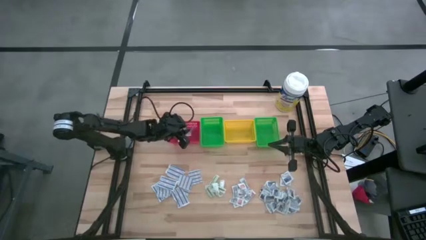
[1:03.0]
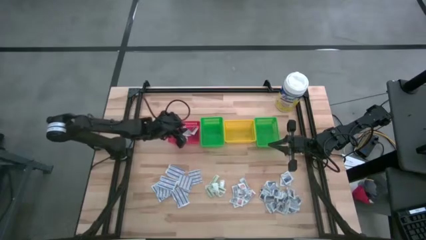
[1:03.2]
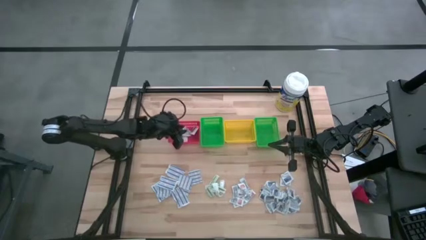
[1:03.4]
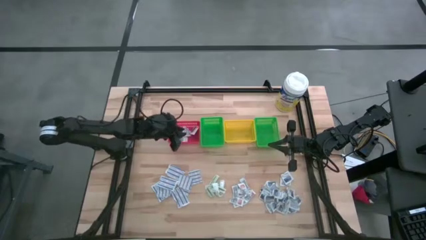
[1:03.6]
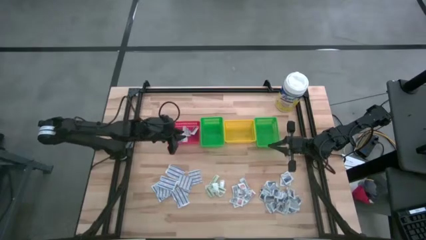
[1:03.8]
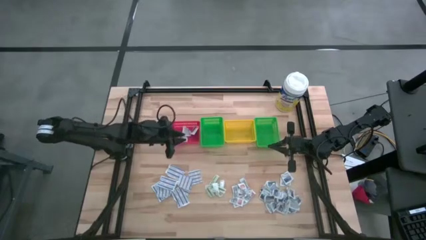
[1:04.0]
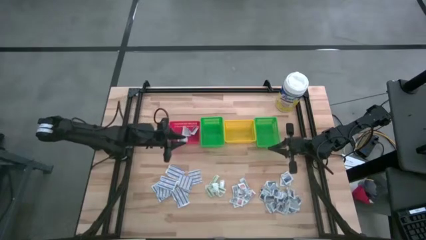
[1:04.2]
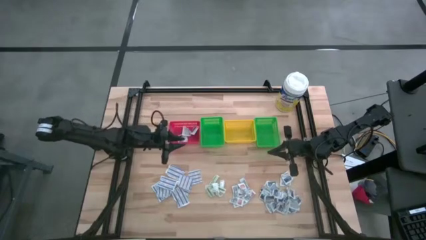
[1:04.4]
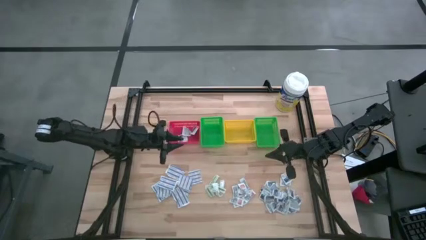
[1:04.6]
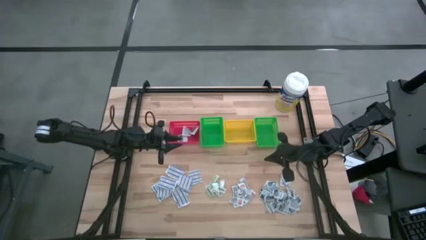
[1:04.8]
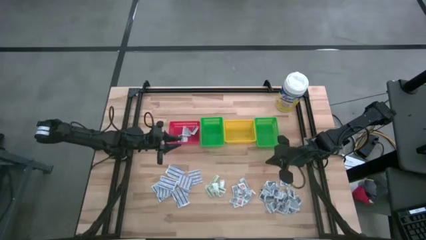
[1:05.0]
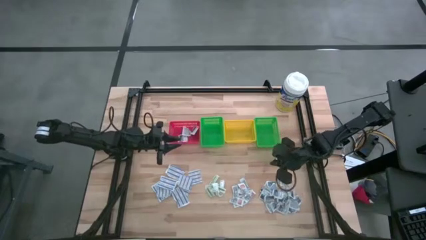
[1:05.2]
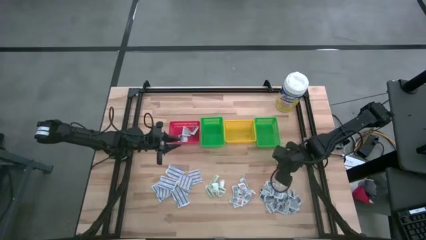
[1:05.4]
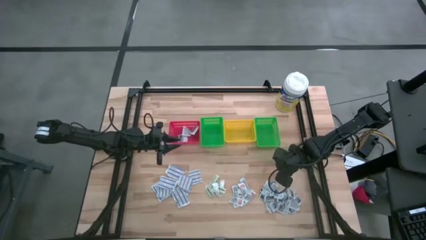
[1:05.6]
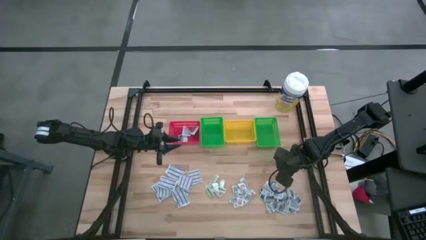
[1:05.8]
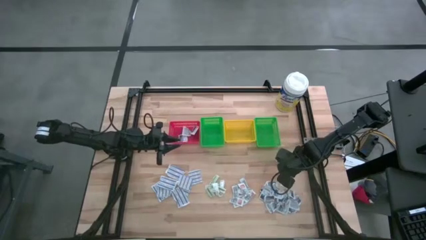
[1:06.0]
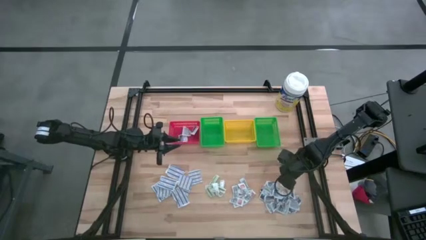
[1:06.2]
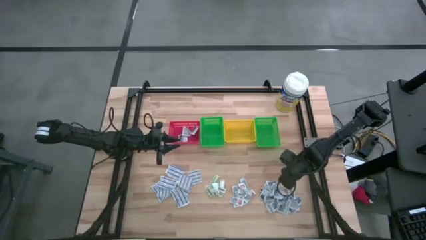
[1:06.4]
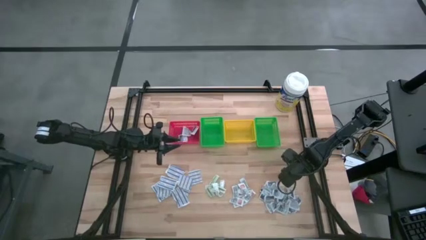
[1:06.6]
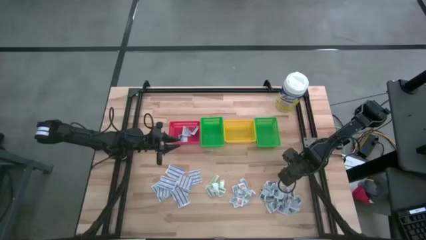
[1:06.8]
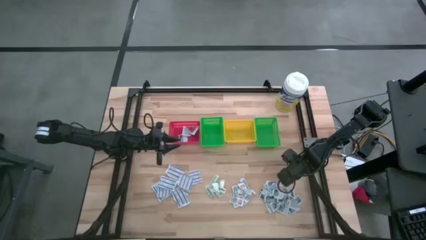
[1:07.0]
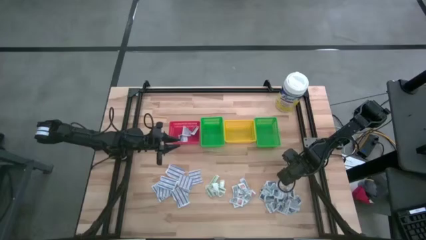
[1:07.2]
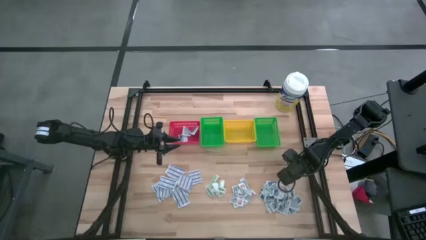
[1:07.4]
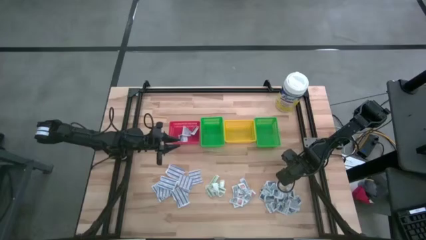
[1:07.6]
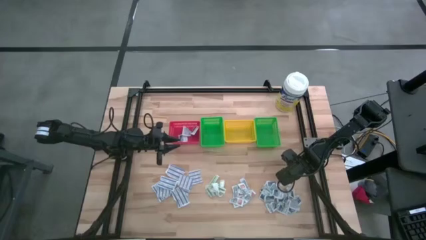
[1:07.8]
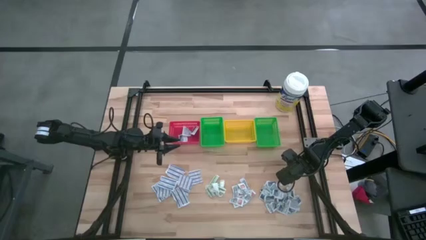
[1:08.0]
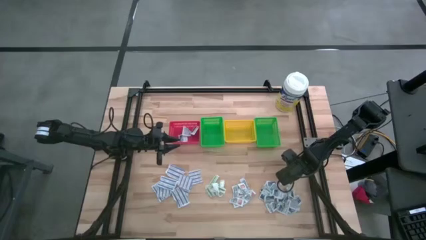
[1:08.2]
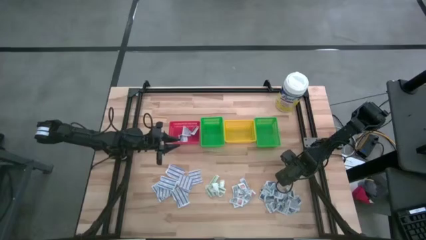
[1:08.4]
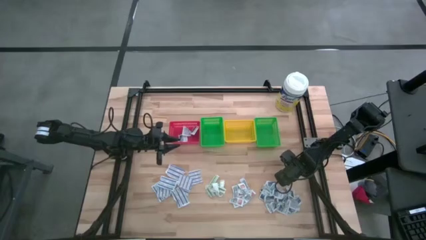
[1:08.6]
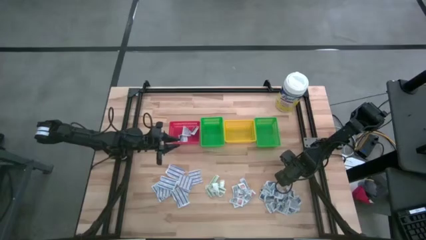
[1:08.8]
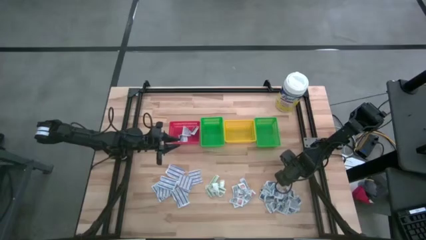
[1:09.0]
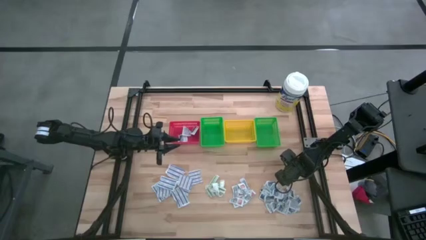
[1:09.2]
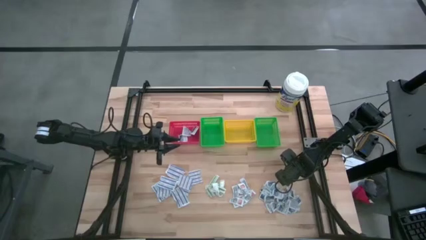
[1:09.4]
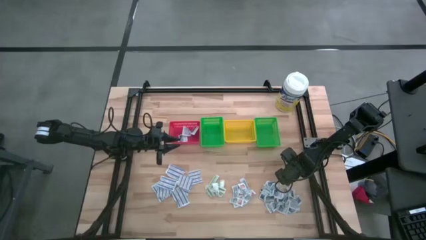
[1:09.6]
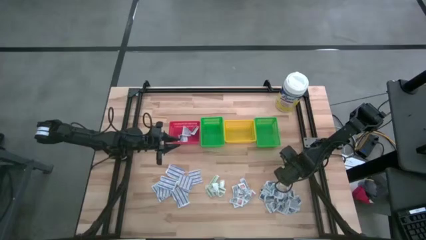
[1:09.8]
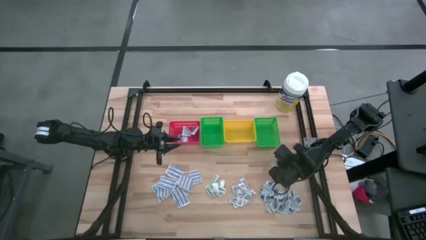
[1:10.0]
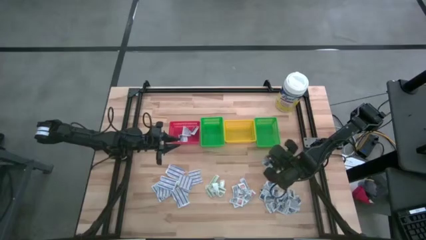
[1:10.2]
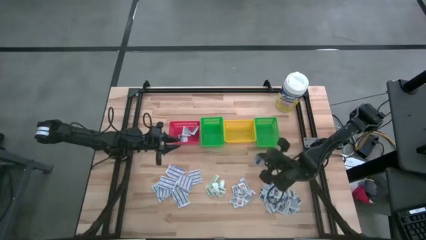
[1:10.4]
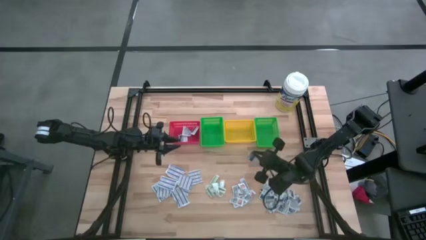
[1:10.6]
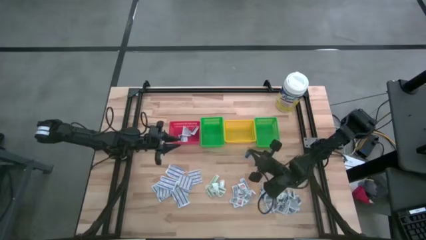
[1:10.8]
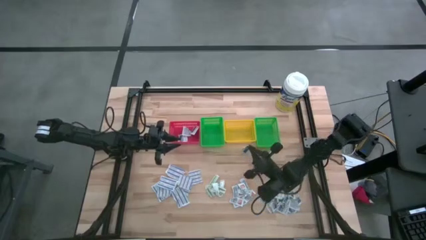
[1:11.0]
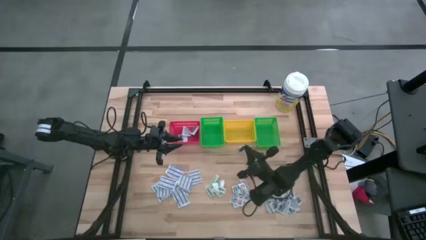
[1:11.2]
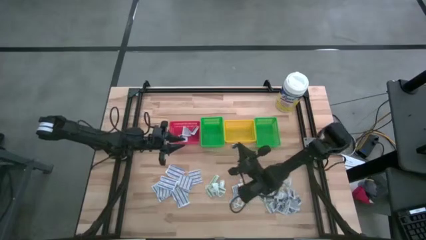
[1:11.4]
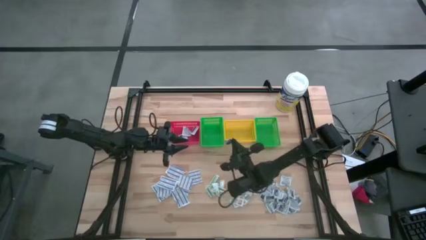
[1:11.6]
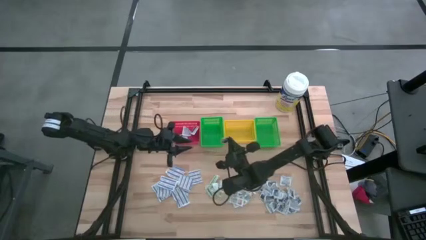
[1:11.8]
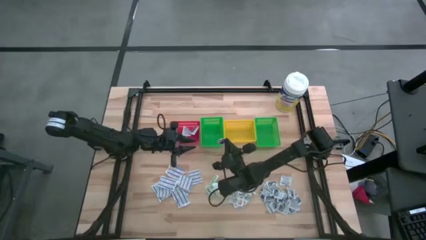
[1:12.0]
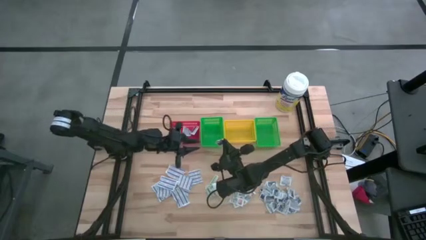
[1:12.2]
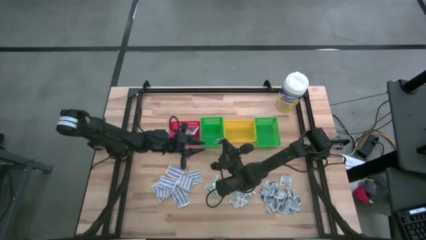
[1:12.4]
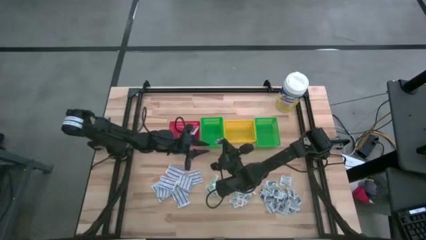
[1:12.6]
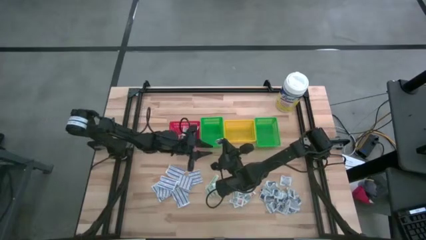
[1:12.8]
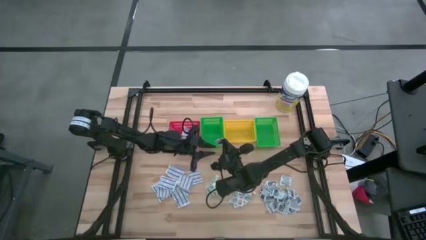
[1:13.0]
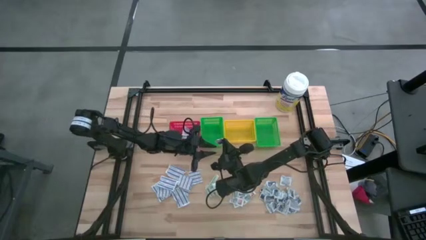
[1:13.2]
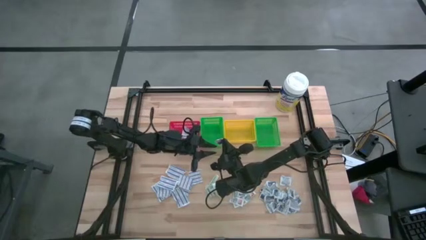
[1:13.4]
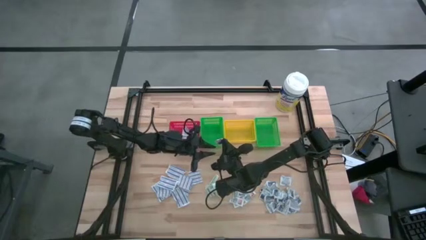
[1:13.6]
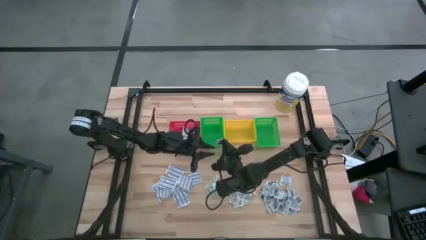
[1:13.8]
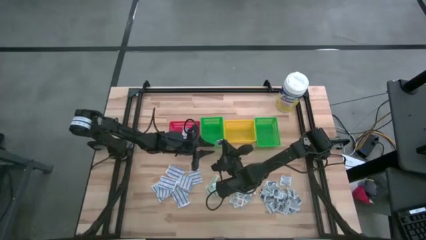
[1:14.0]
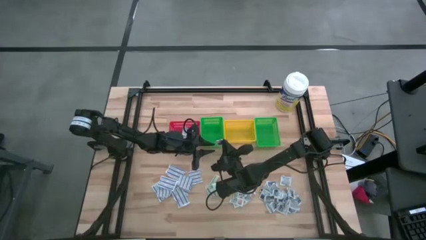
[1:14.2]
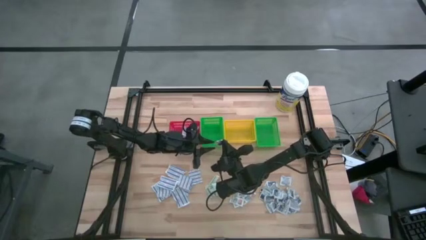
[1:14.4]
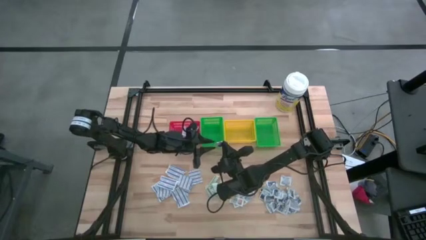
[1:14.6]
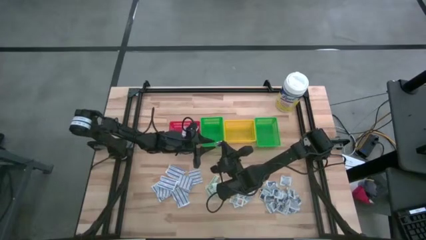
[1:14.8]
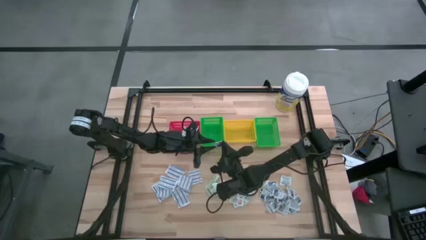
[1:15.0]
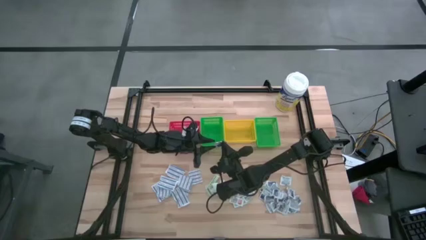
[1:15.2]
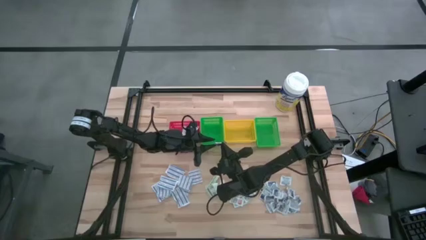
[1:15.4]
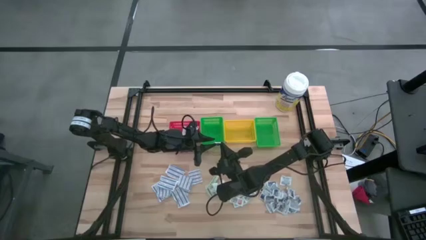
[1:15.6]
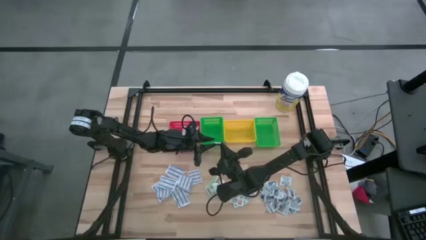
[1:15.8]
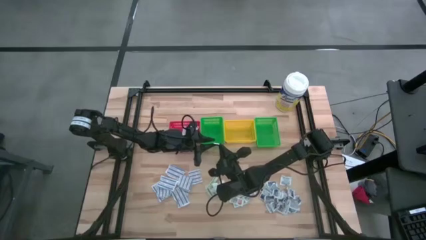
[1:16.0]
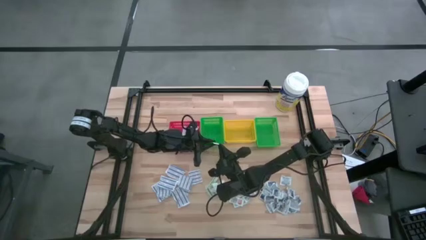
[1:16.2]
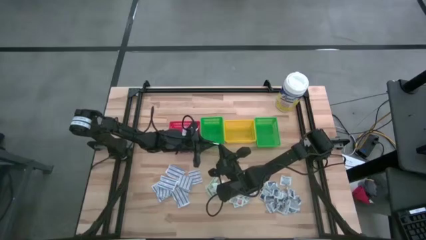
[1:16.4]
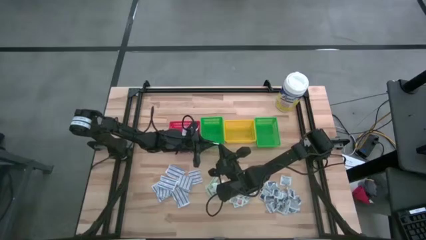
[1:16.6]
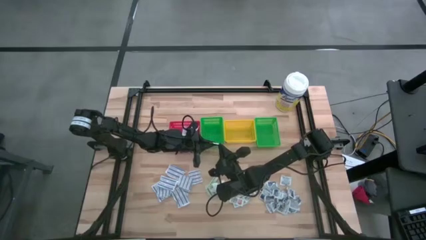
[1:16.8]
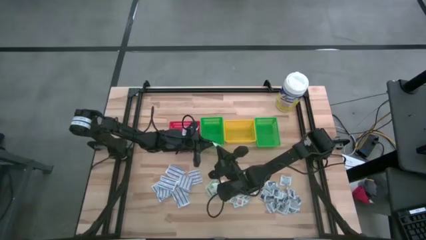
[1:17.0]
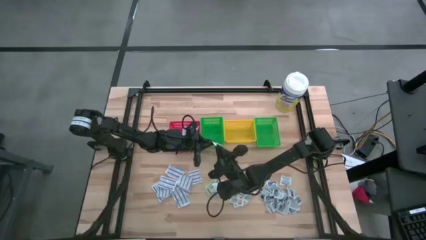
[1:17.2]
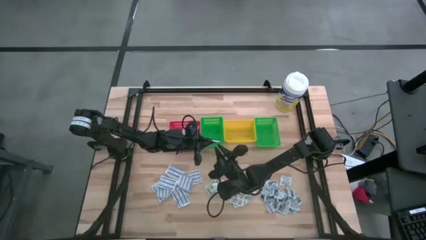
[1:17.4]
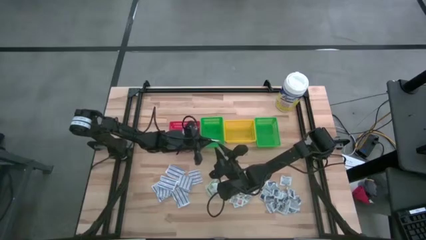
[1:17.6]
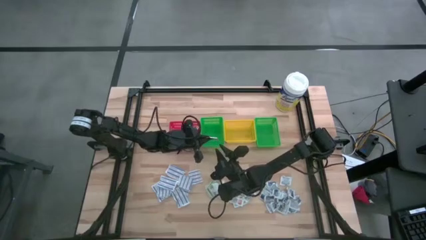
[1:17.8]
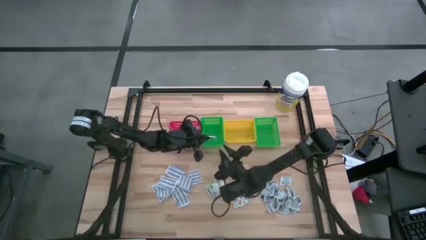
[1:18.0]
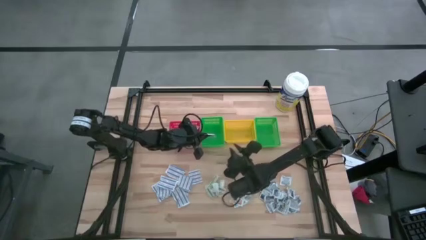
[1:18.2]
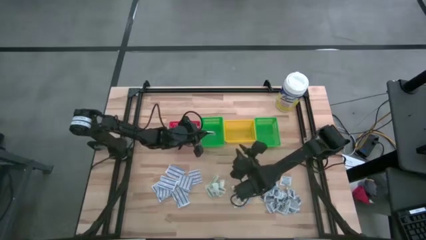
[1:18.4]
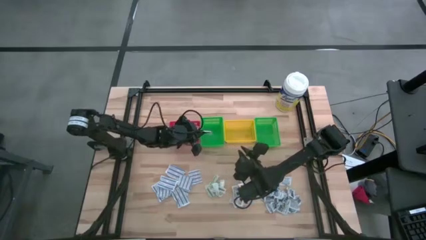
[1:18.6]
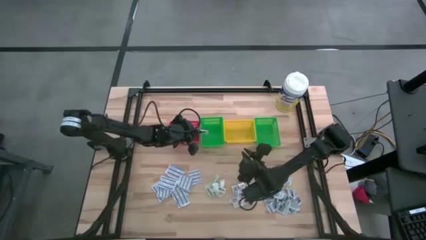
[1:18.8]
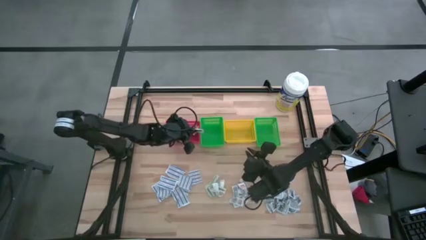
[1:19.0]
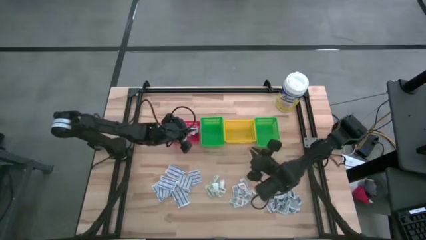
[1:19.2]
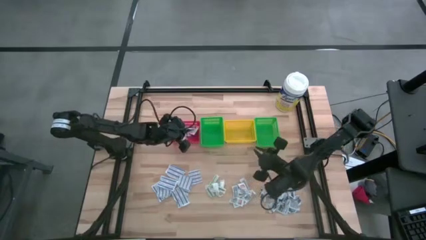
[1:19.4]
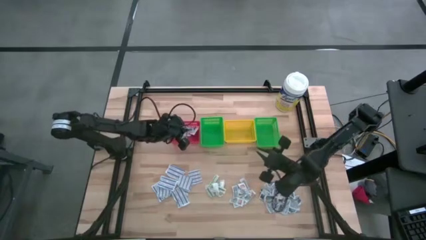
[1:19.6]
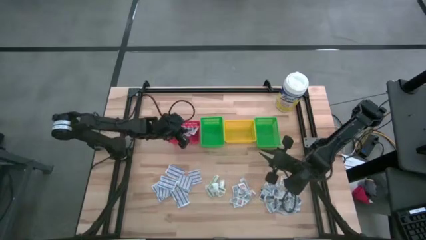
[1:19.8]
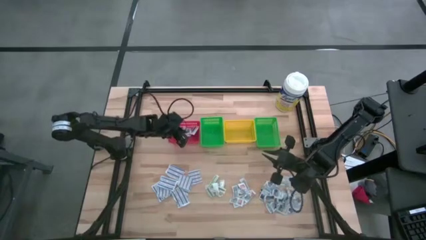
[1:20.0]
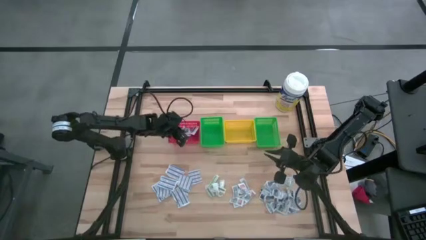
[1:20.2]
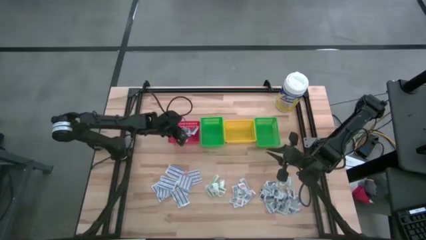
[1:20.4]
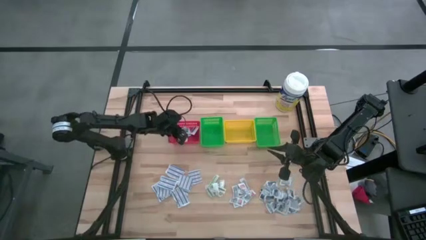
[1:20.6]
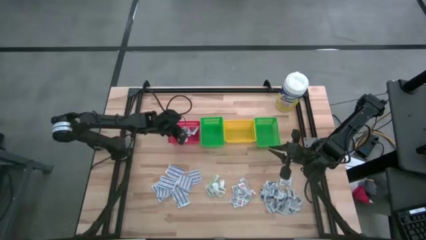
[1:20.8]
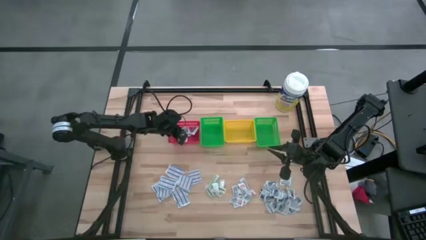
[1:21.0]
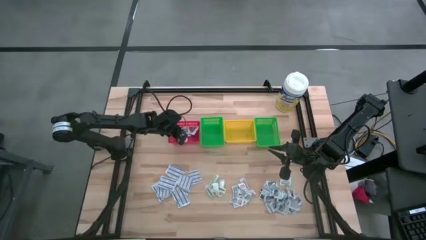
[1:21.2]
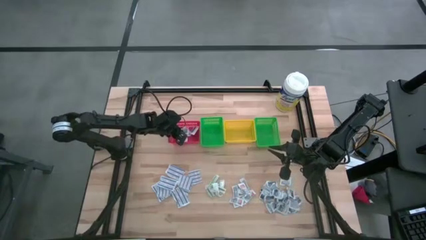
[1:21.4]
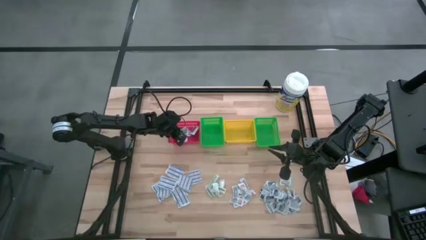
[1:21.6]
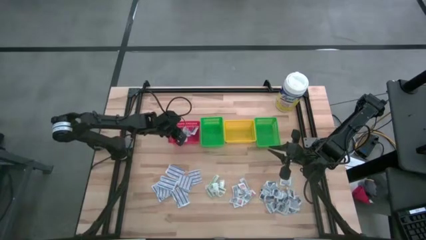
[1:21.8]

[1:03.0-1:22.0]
Task: Pick & Place First Aid Supplies
Put the alcohol pad into the red basket
